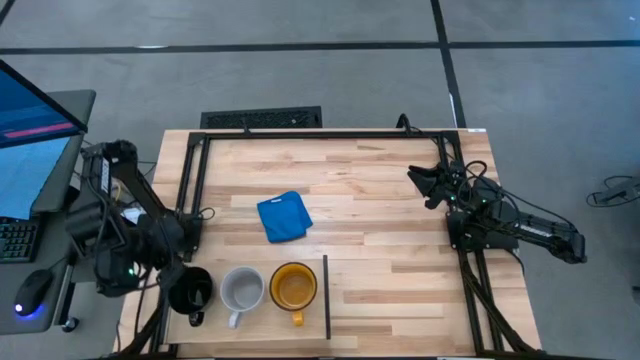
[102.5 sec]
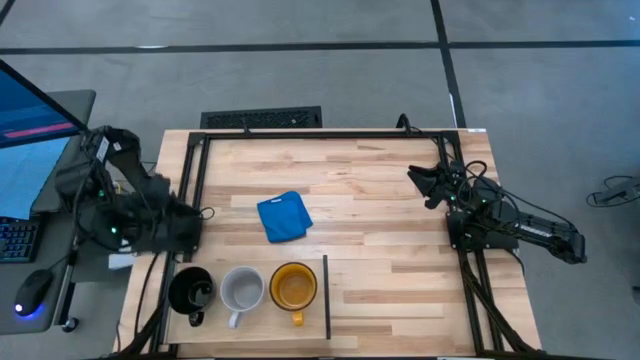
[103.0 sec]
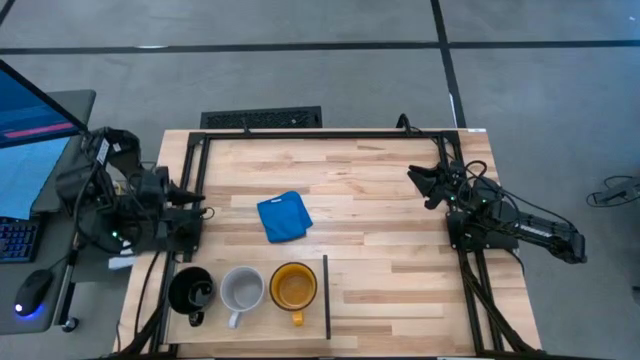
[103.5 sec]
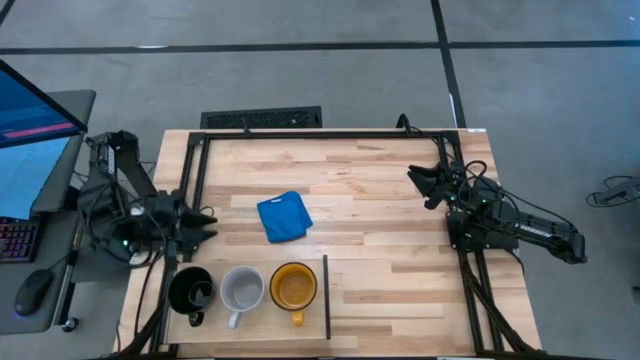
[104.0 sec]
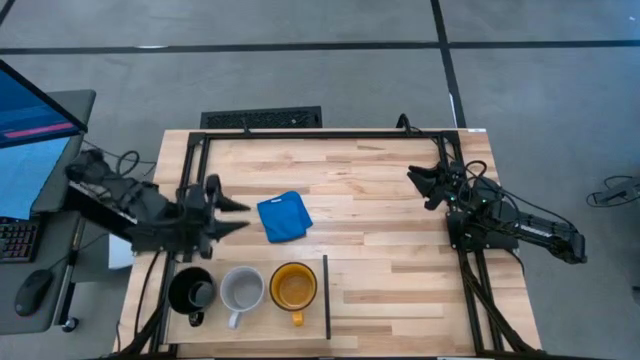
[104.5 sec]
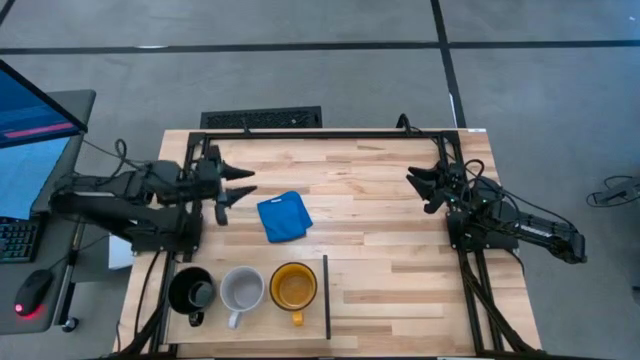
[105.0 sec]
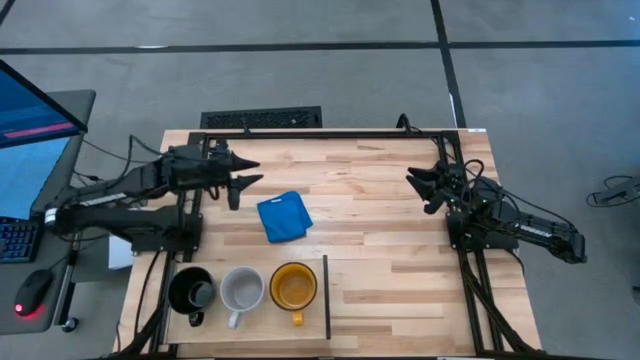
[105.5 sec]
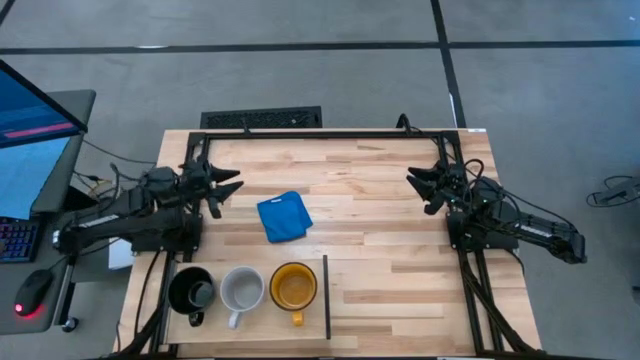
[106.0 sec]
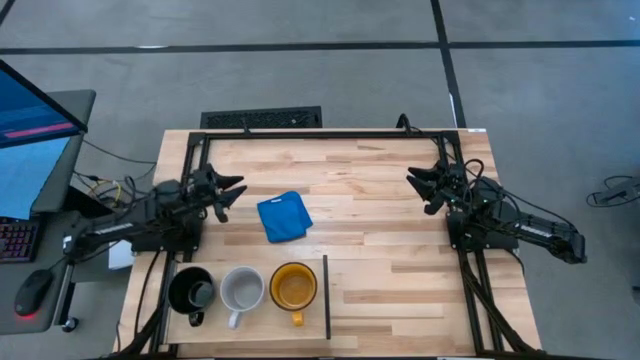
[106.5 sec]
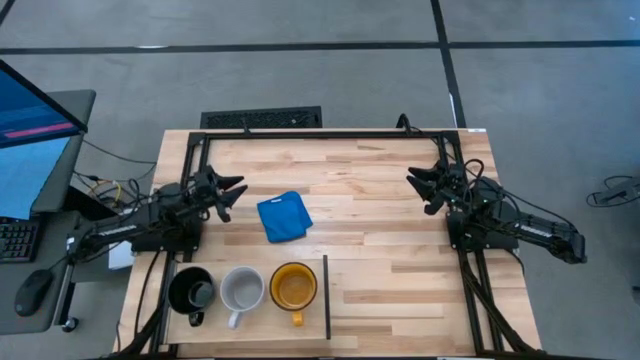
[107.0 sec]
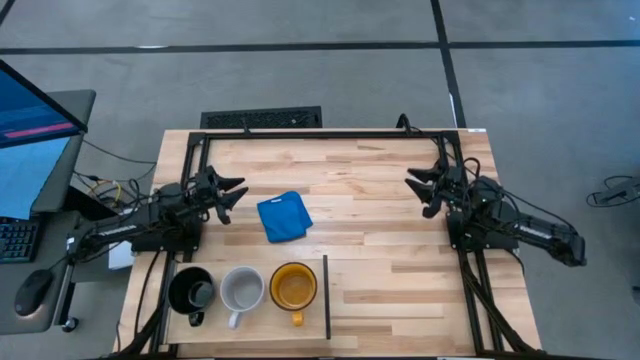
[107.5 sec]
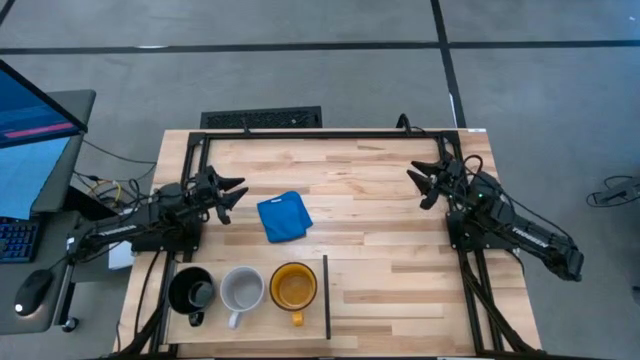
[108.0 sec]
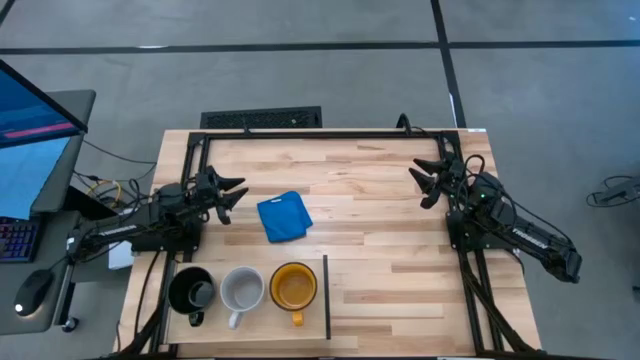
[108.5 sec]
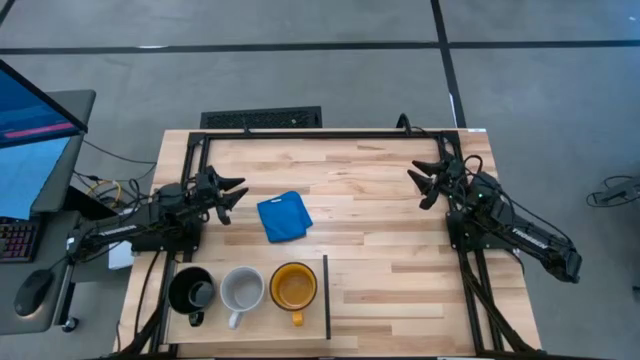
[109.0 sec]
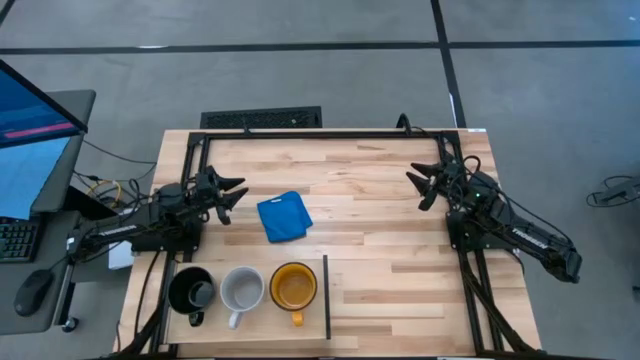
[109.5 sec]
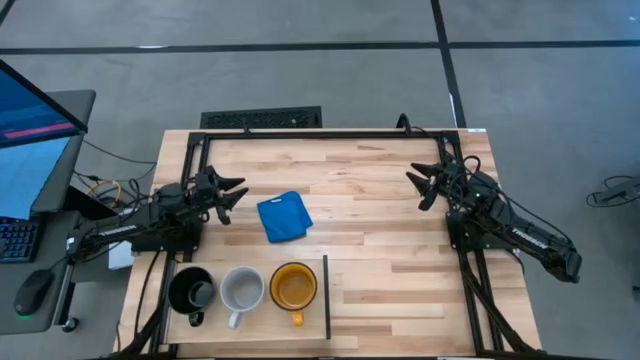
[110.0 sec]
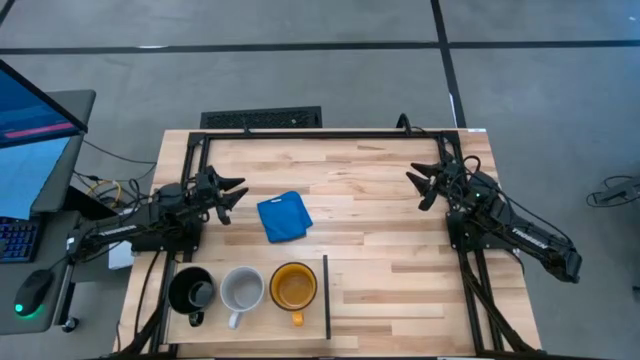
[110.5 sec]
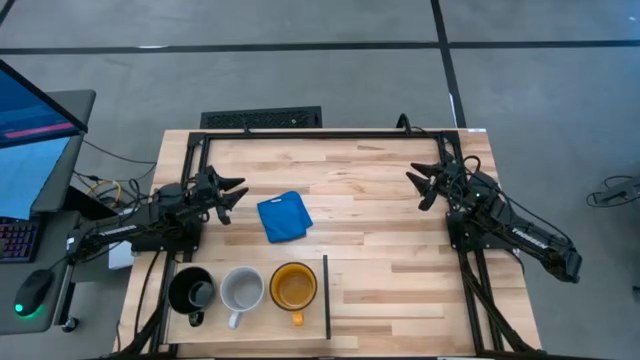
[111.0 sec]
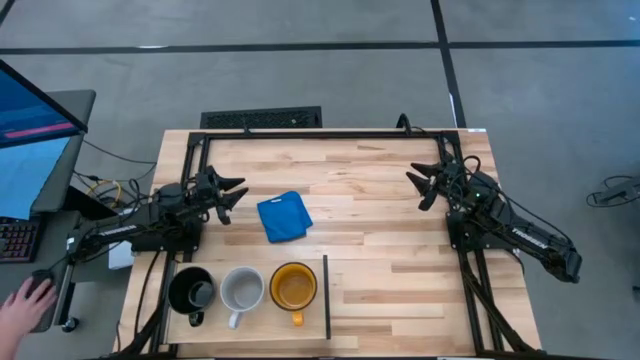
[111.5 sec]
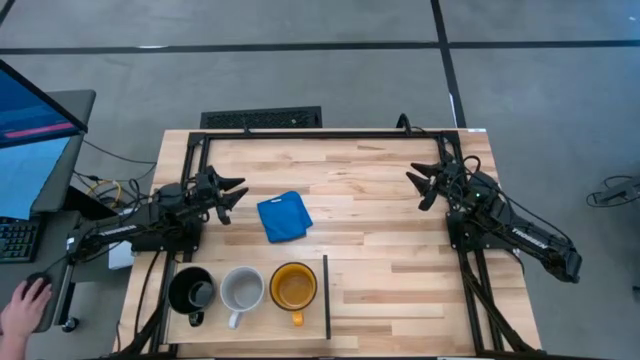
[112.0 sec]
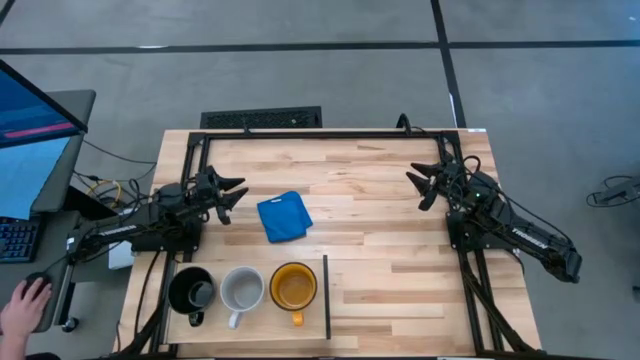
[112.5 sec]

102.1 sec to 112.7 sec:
Task: Stack small to large cups/mugs on shelf
Return to Home Position

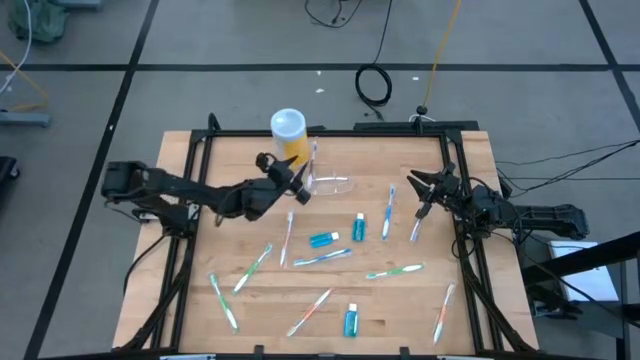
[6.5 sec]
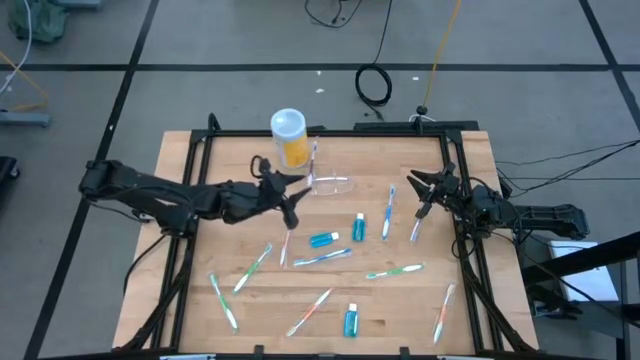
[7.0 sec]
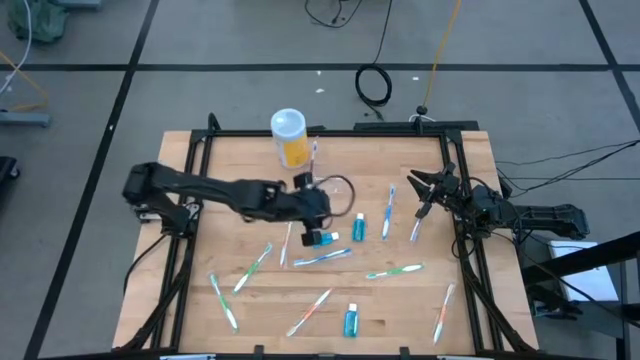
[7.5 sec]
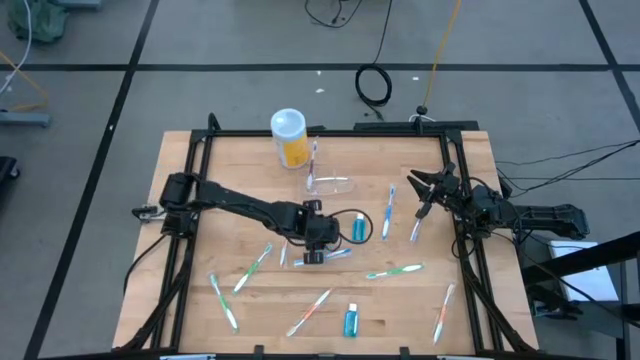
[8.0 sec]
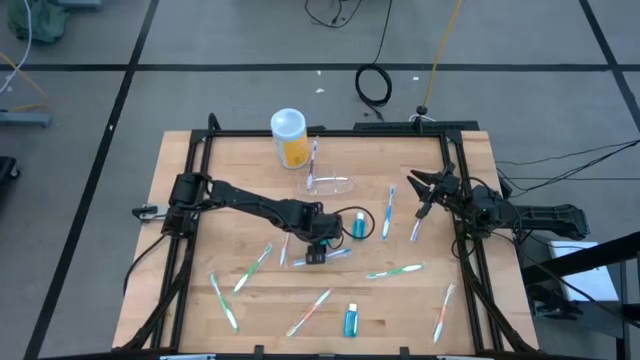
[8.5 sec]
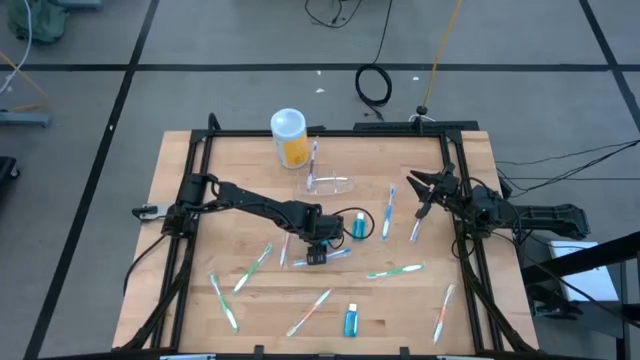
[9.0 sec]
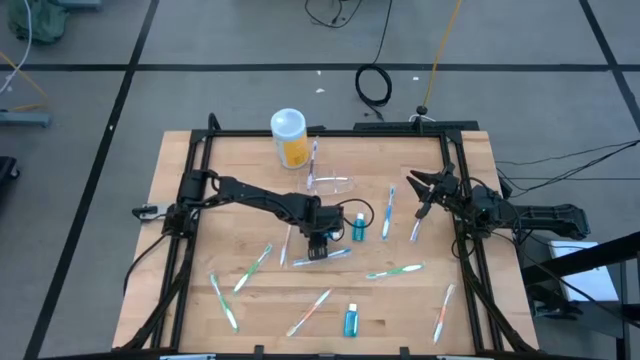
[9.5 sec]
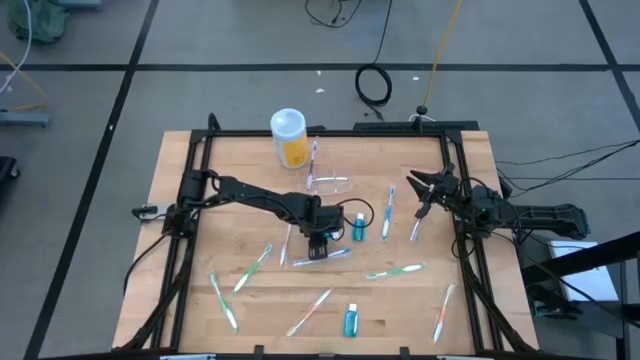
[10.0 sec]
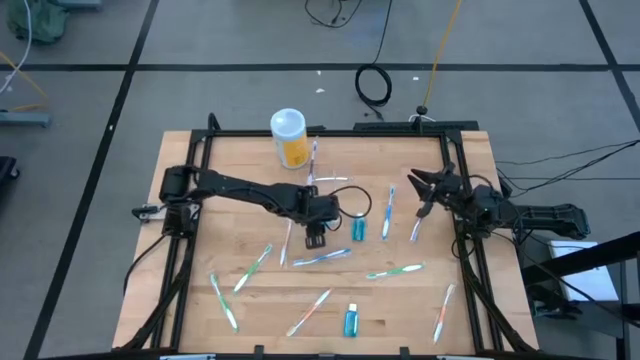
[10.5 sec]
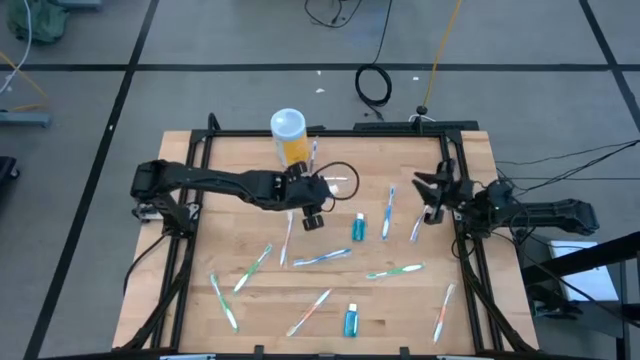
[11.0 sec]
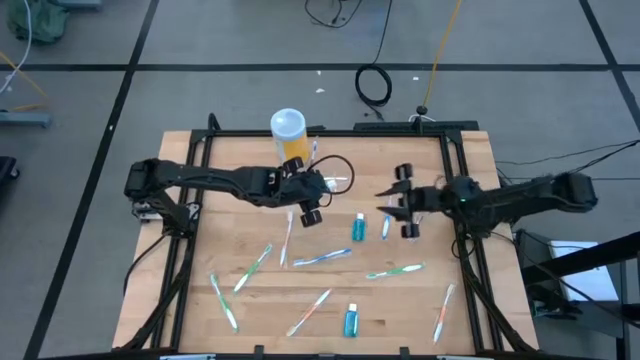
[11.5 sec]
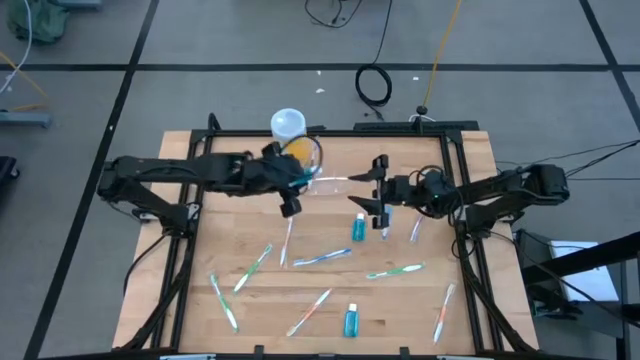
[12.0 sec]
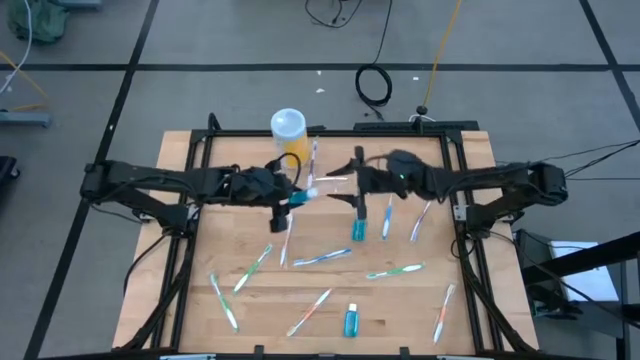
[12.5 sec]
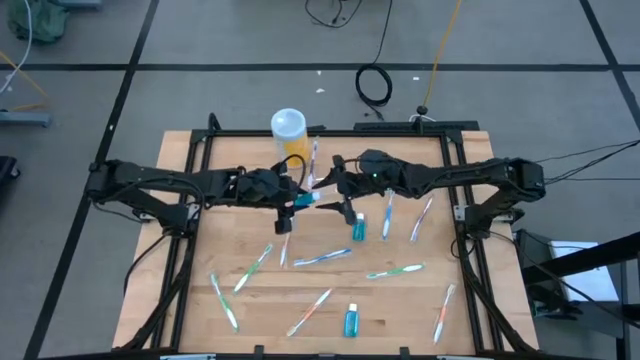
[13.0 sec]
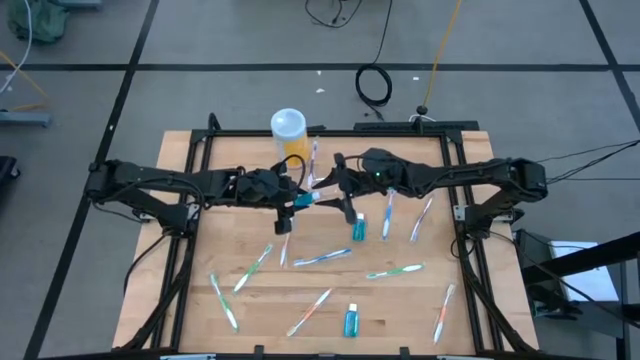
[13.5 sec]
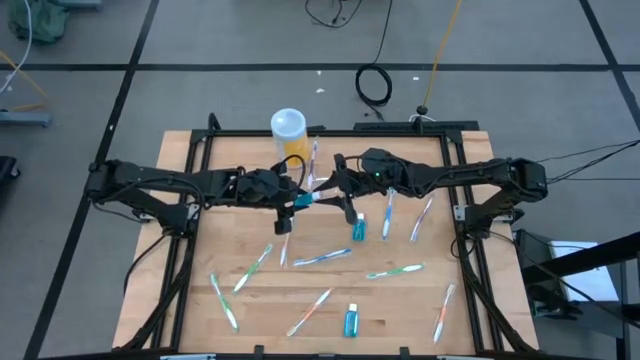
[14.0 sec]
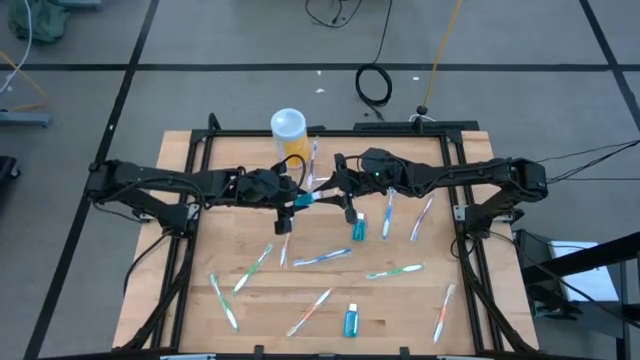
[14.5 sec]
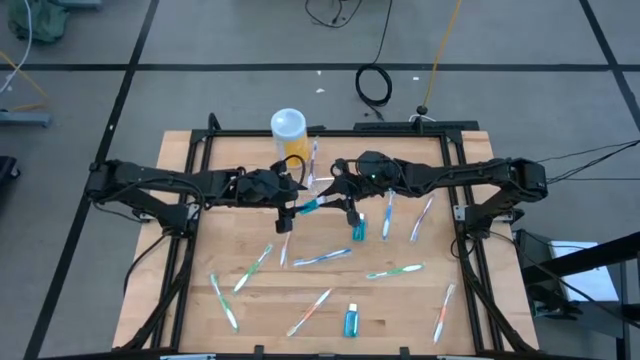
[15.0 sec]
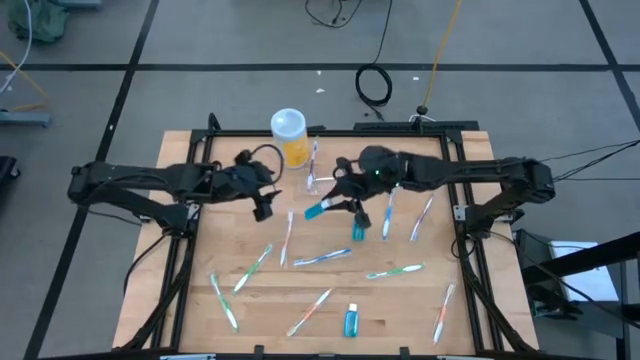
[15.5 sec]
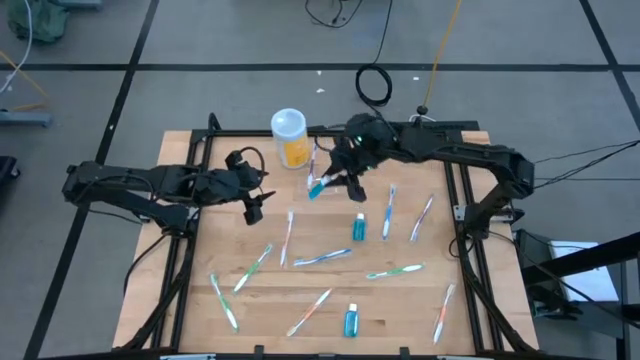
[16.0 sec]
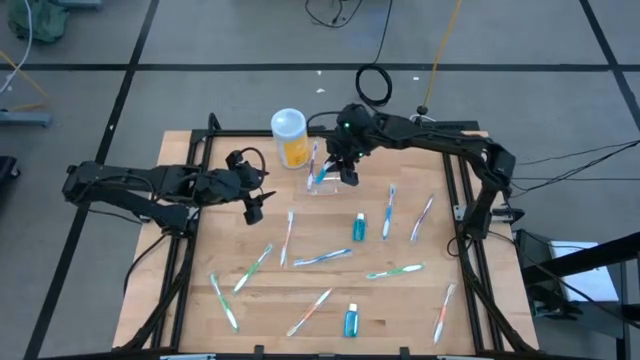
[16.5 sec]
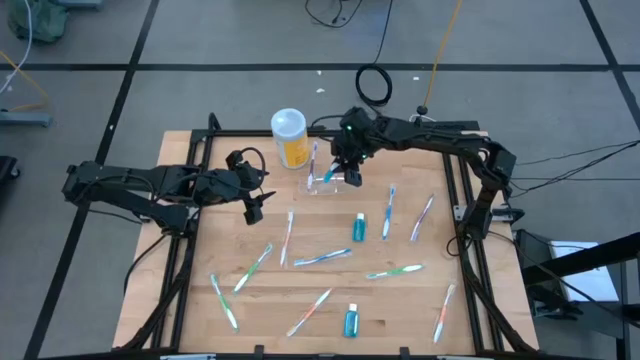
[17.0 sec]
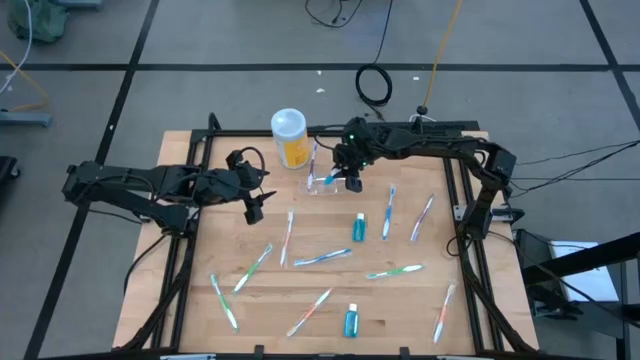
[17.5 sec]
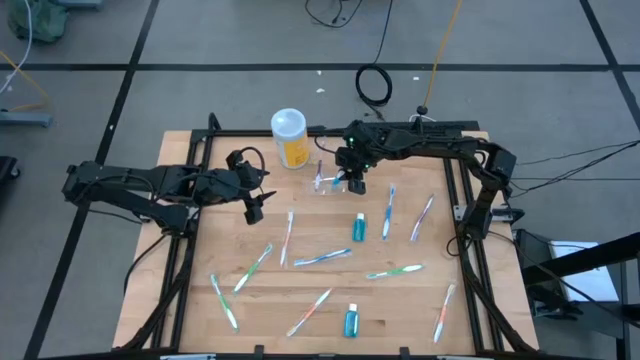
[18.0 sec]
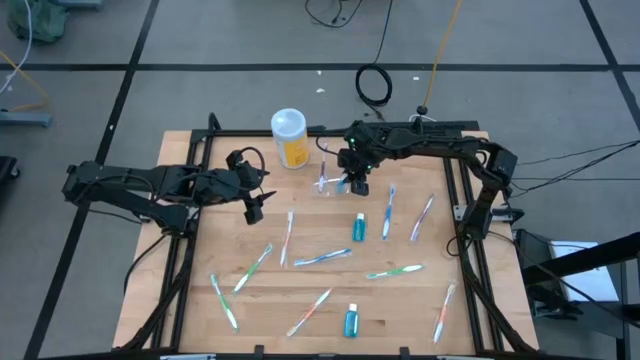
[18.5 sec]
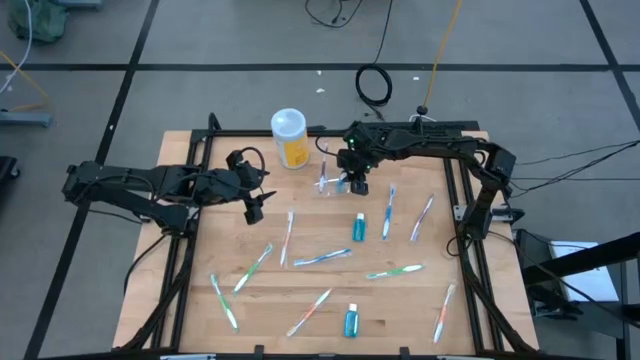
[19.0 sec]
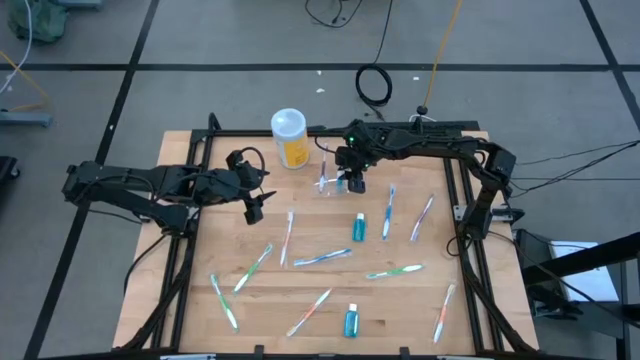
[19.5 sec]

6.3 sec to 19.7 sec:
Task: Pick & Place toothbrushing station
Put the middle mouthwash into the transparent organizer
